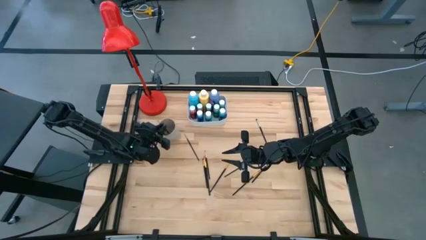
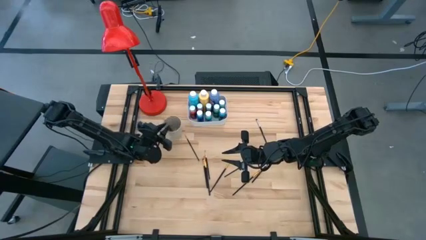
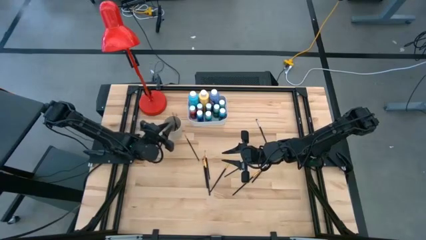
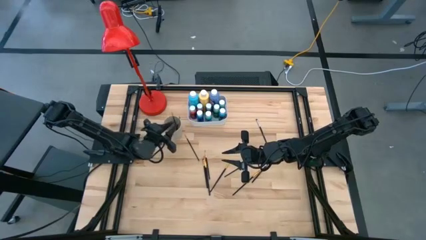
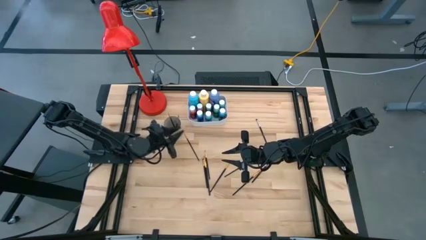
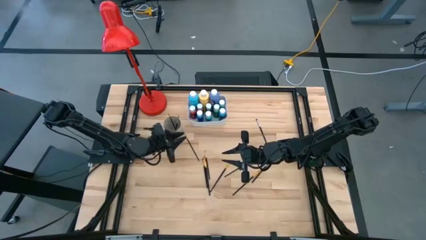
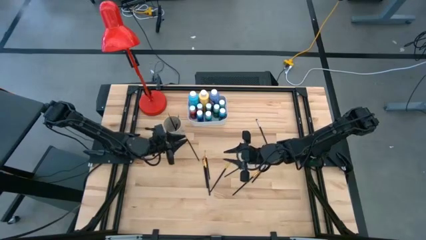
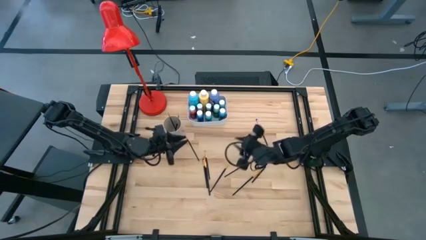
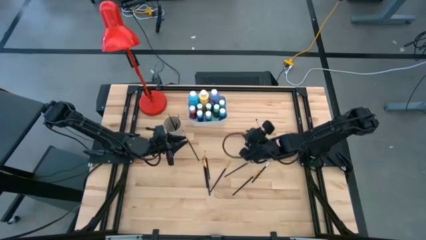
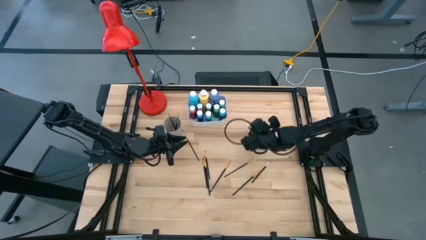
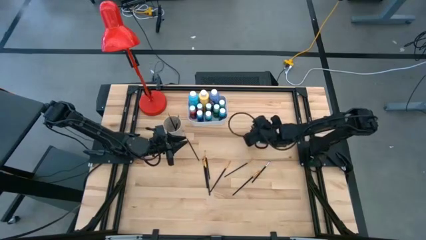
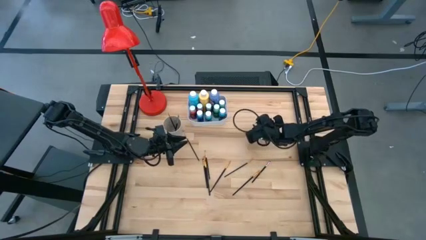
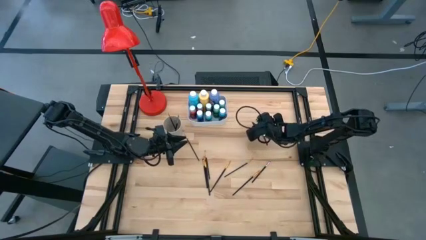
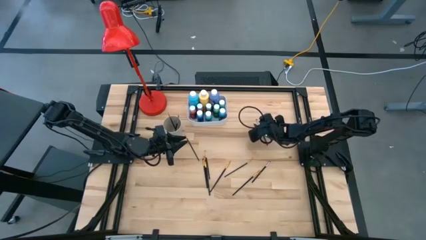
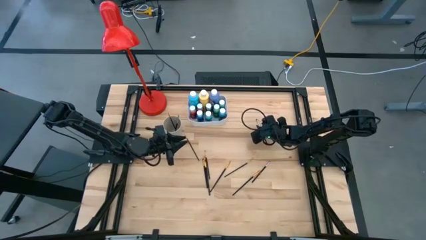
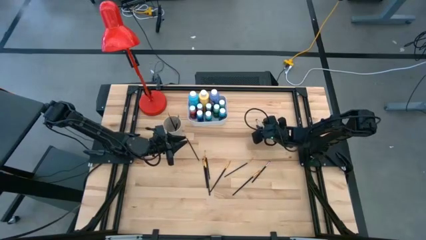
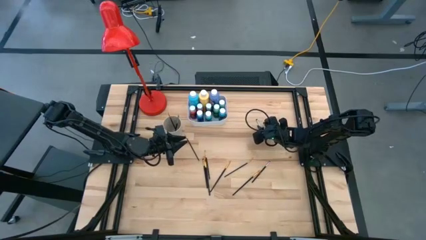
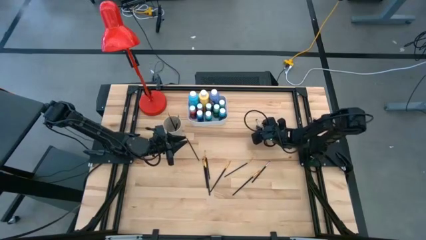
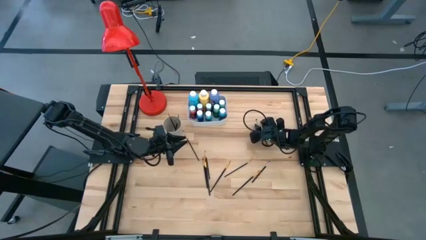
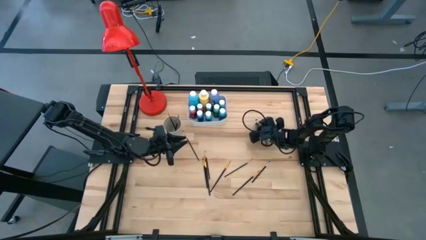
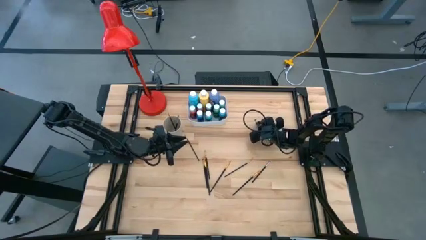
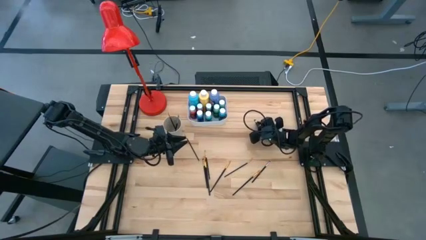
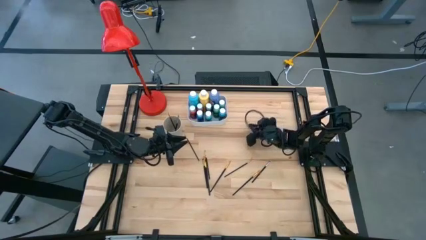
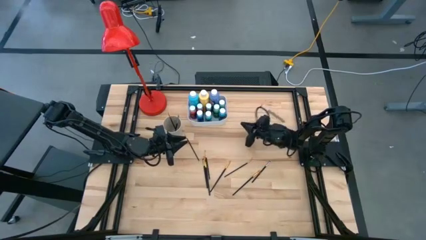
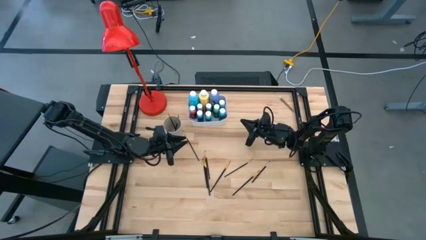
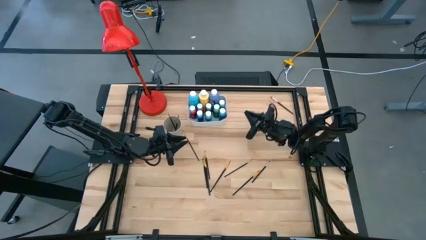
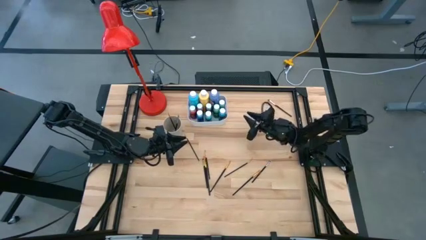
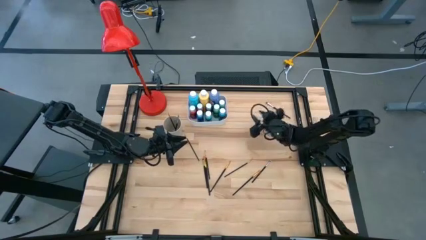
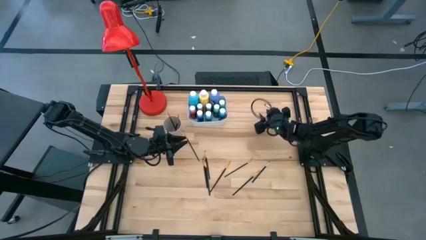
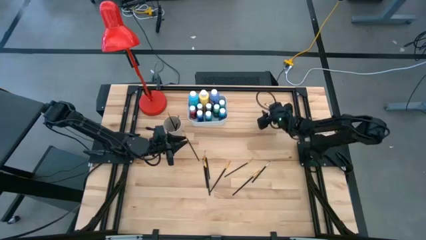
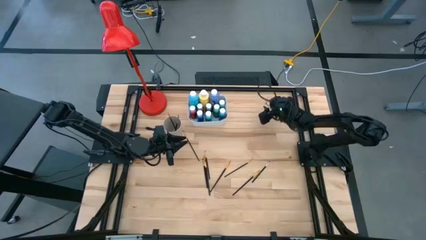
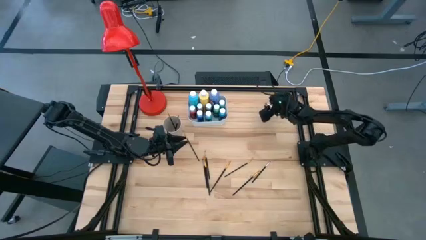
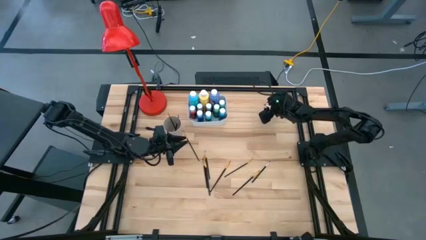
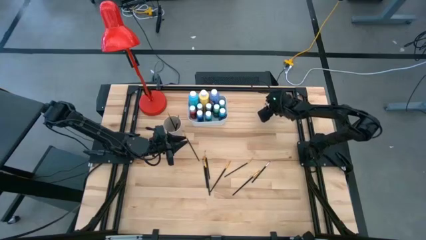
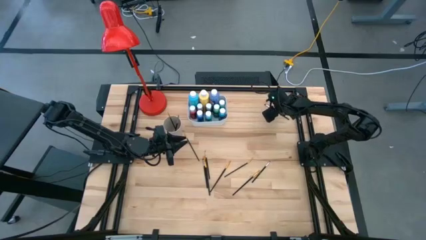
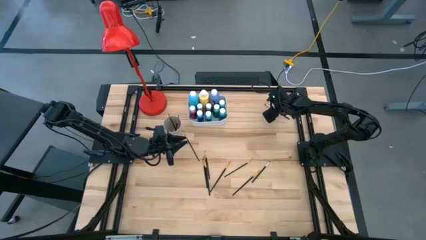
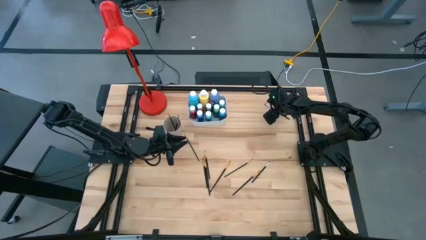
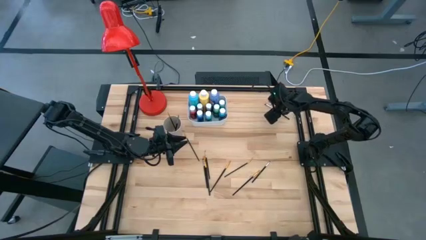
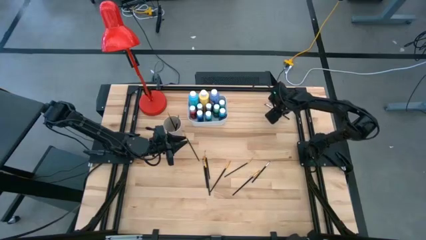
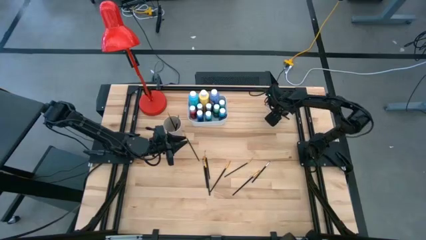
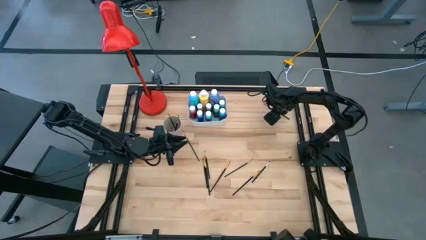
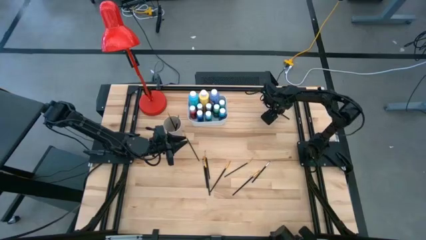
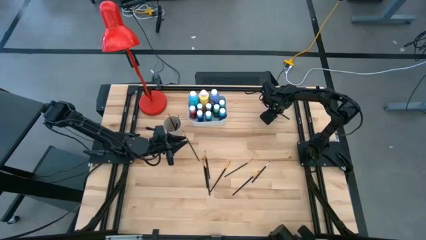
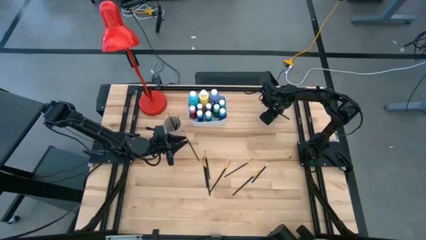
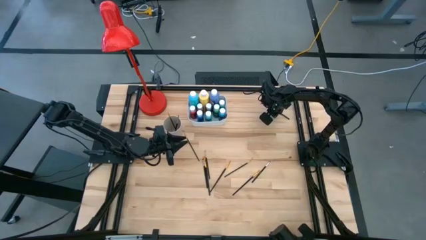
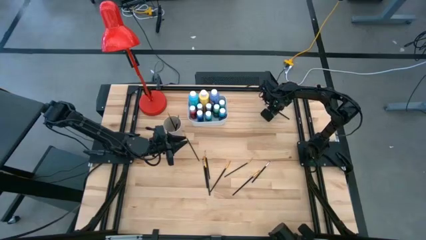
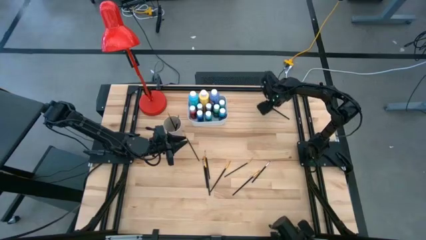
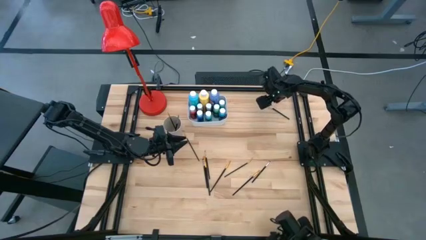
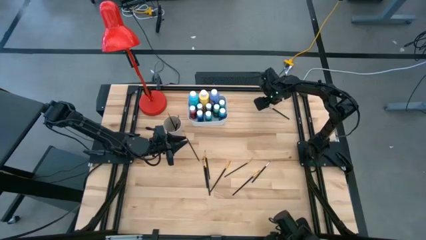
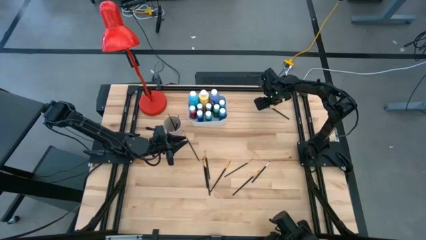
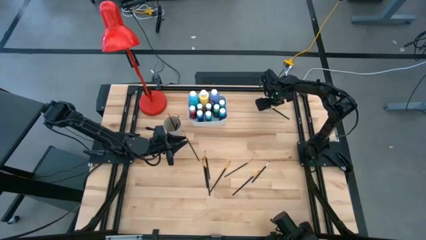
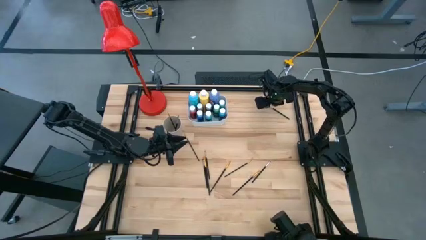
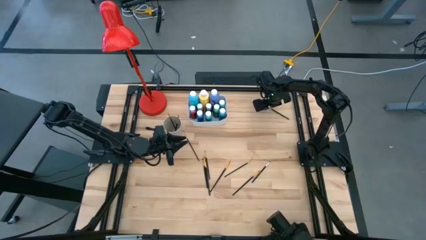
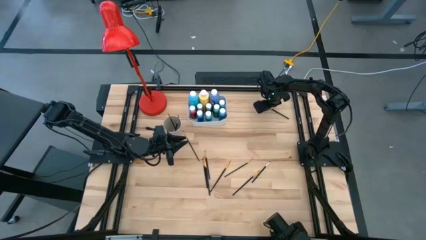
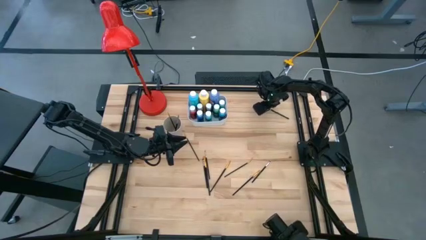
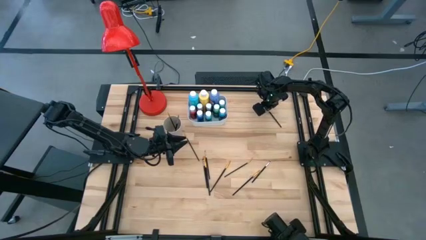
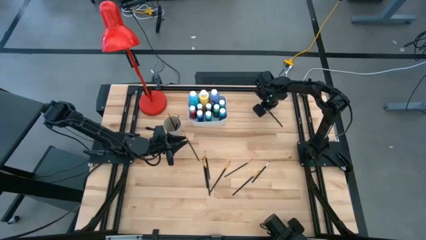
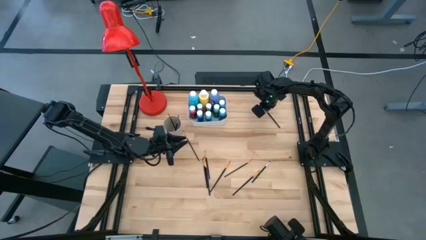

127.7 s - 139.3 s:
Task: Pick & Place Paint Supplies
Put the black paint brush into the white cup

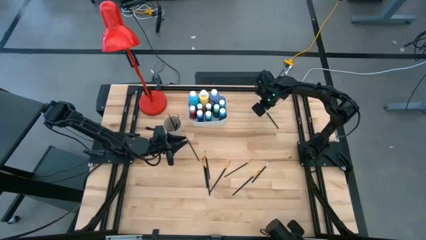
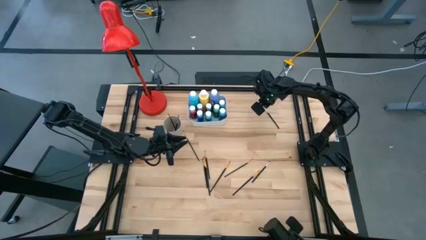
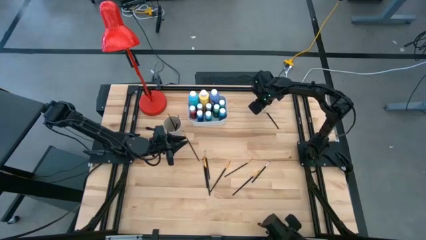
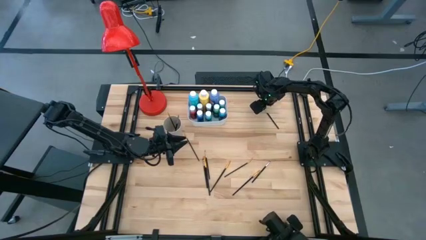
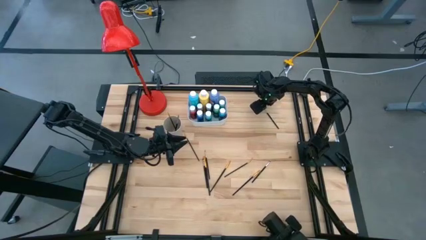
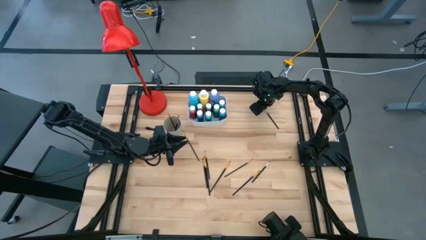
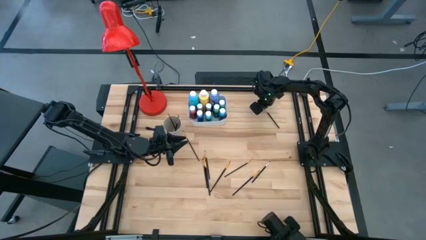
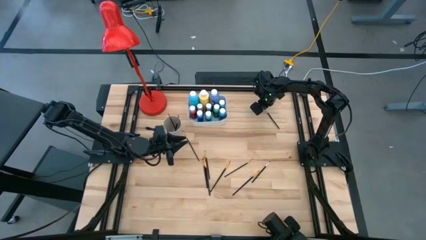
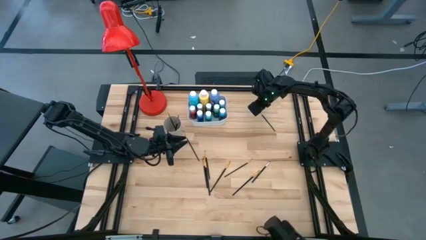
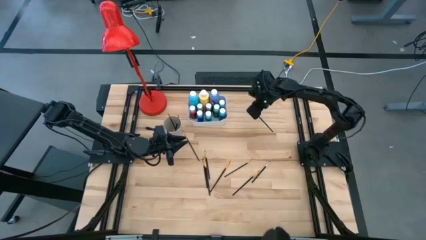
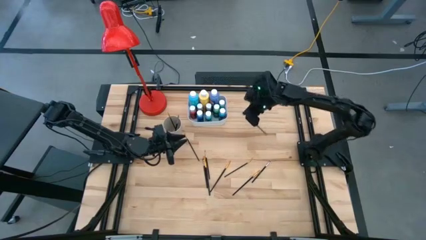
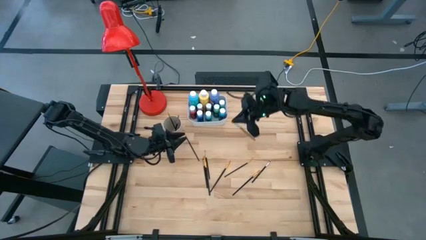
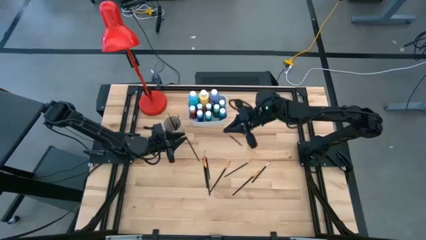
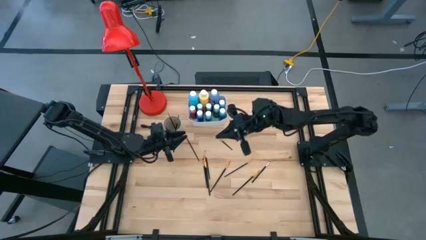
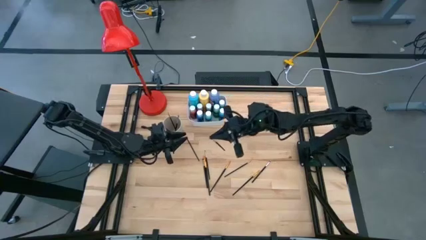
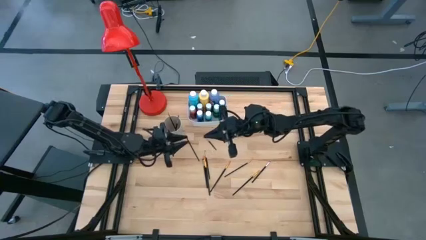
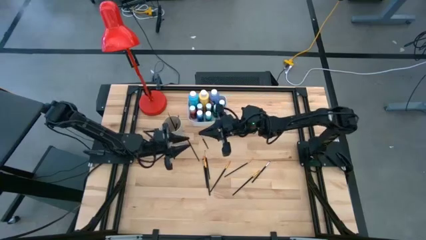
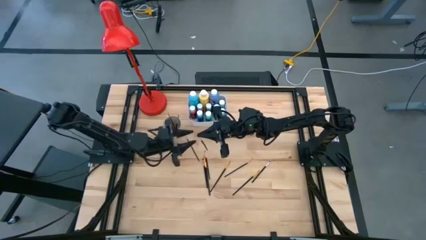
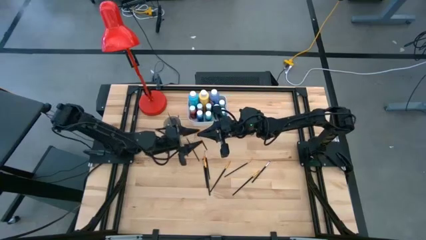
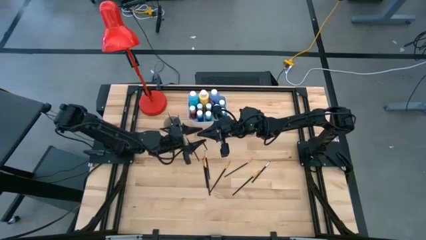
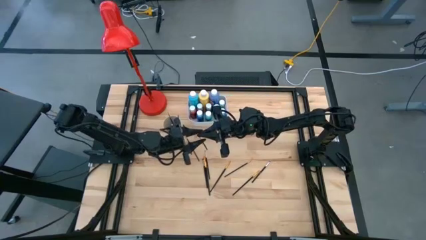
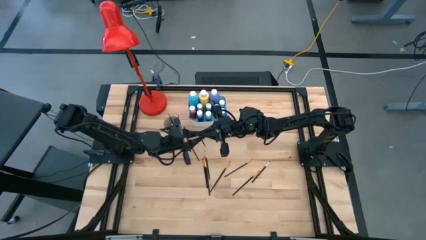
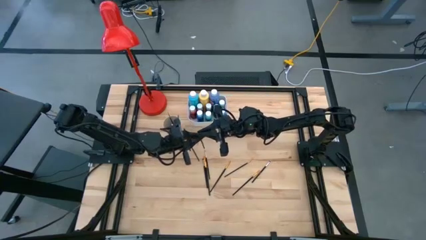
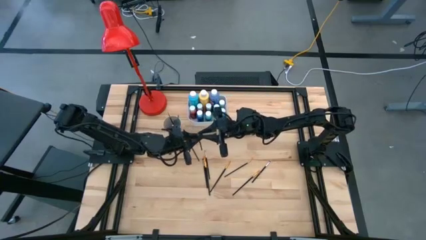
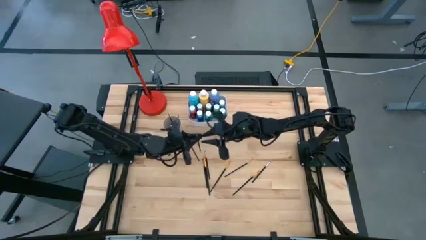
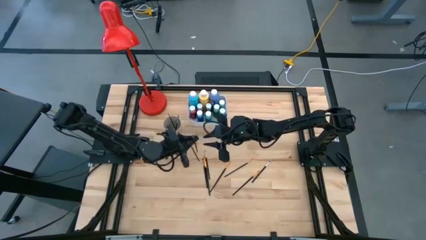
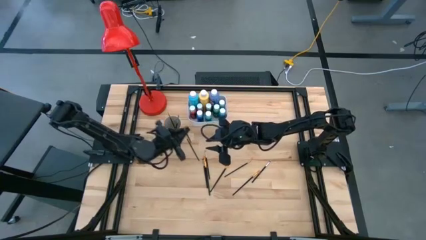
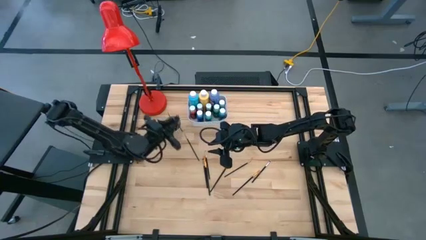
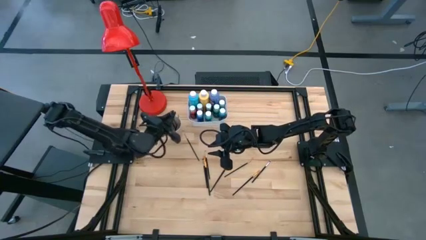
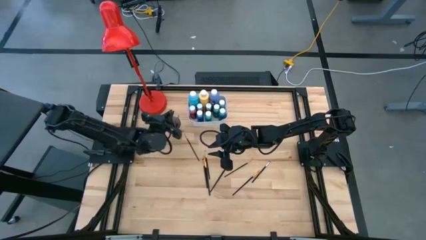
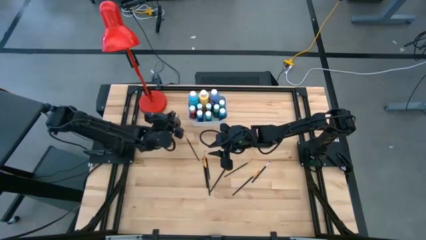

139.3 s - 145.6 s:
Put the black paint brush into the white cup
